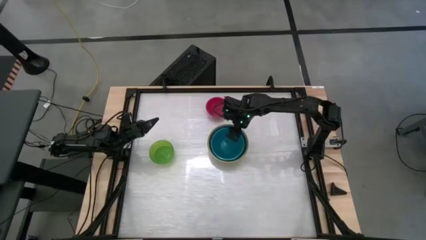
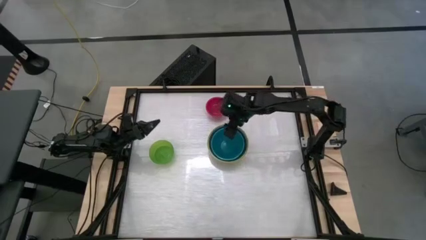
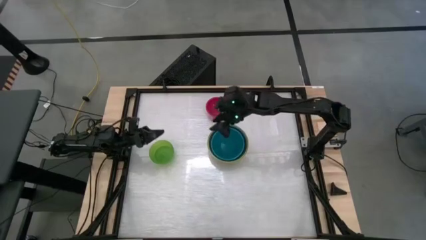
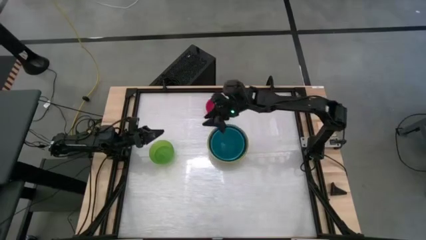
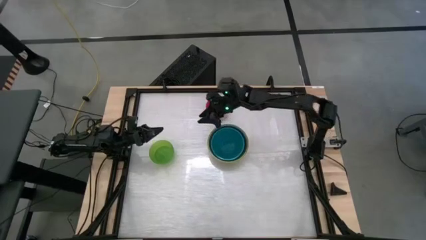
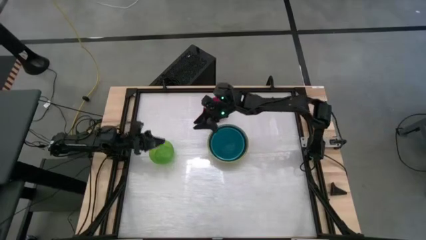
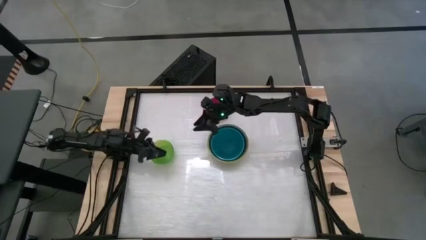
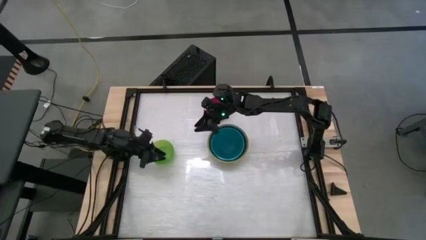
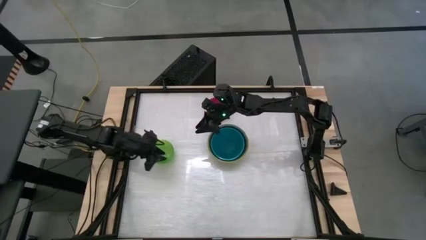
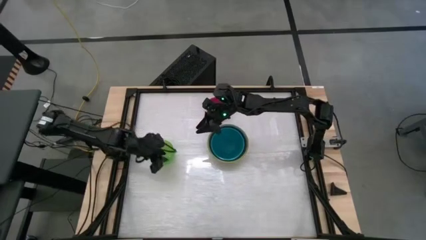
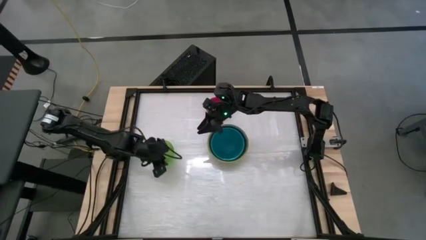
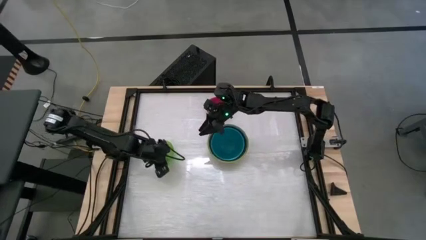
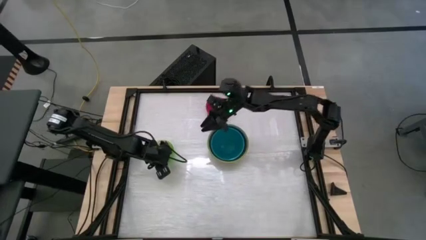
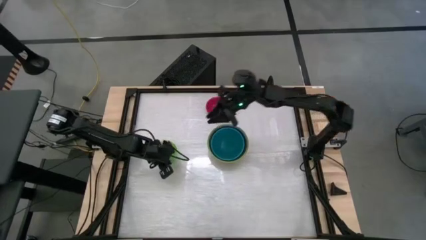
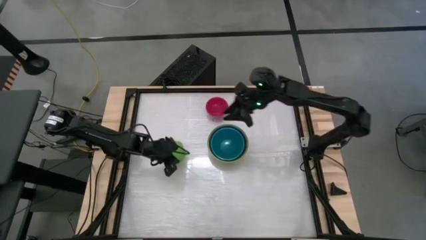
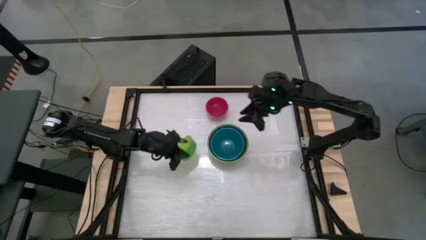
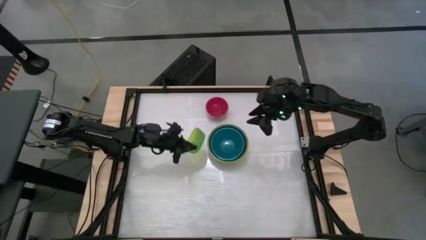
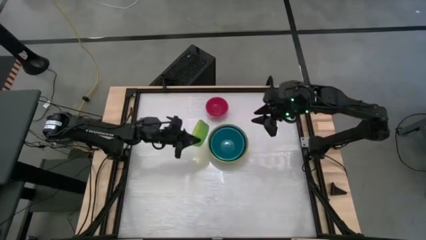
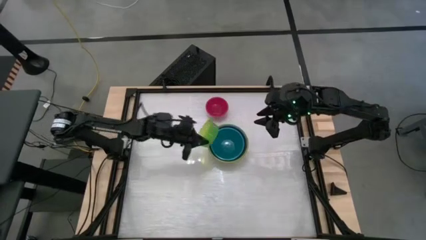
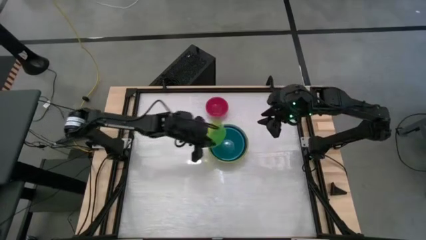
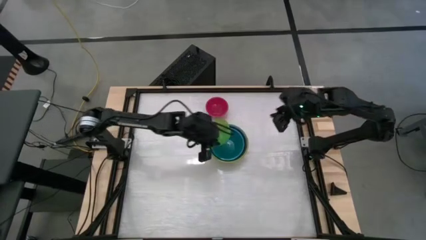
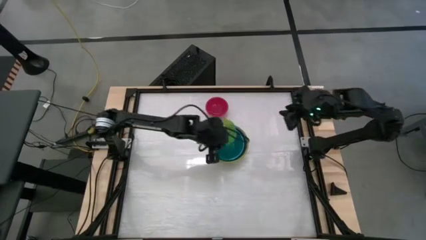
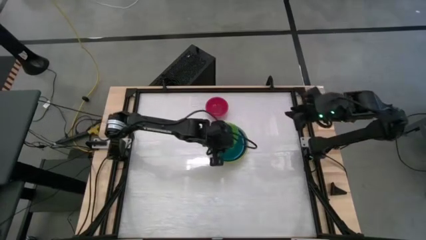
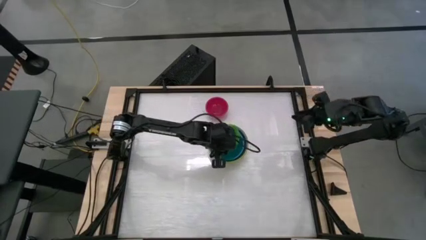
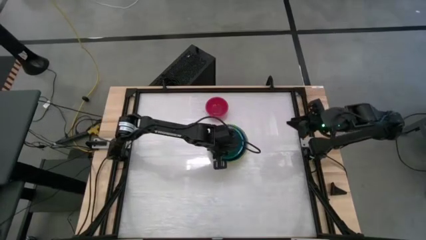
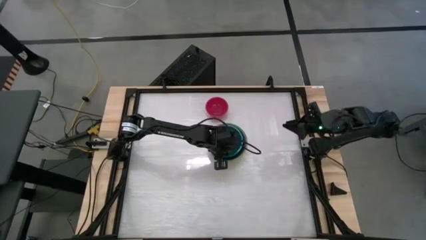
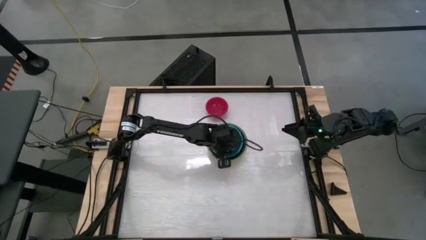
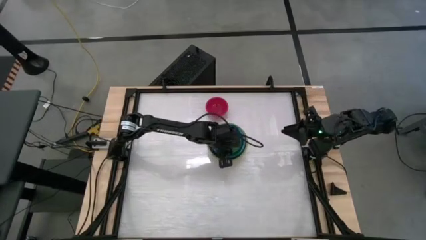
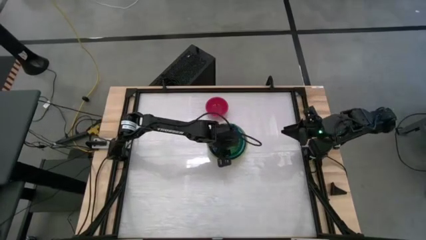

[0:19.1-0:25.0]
Stack the green bowl on the light blue bowl

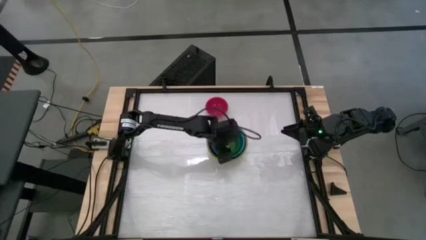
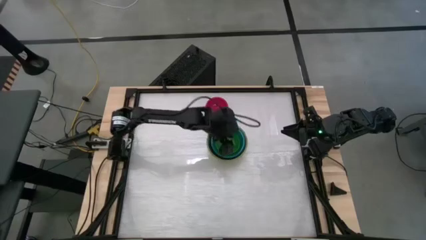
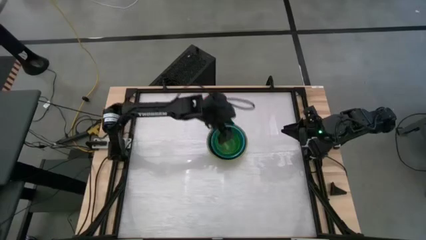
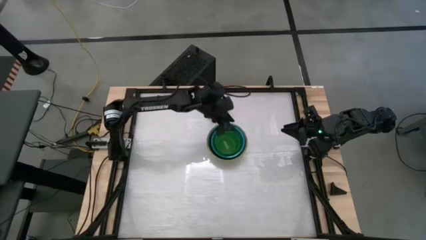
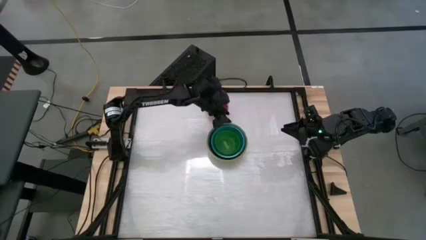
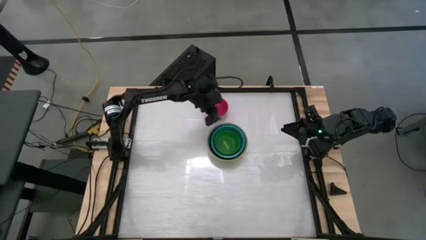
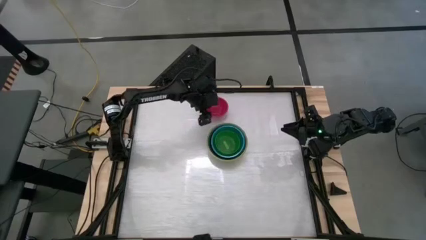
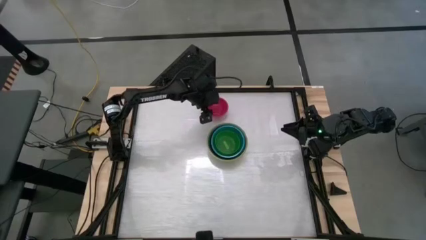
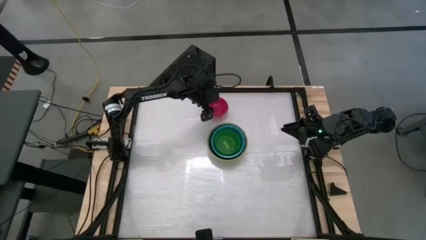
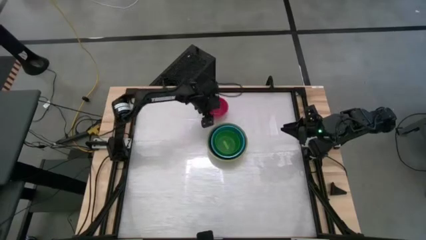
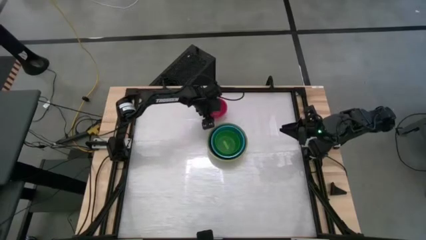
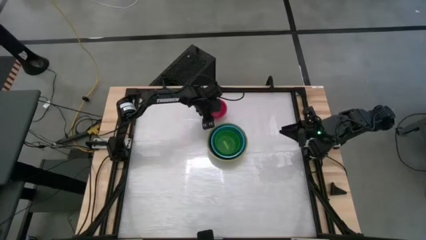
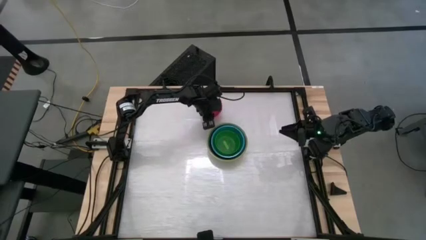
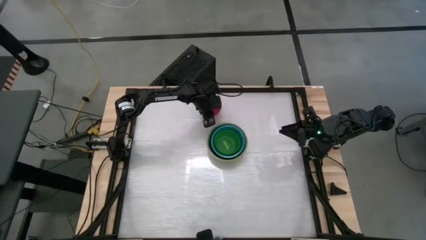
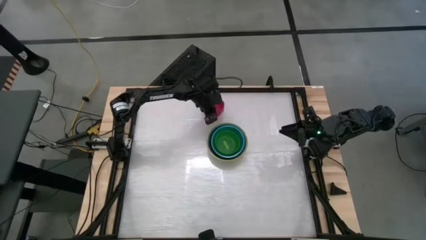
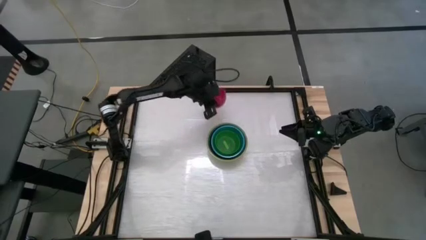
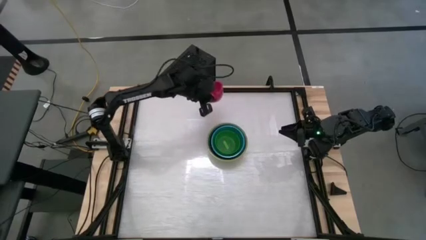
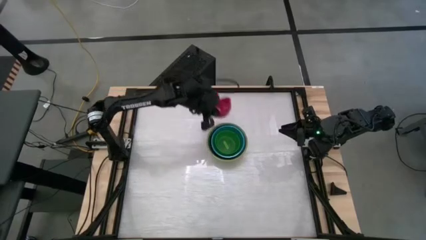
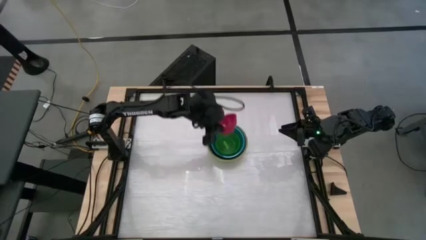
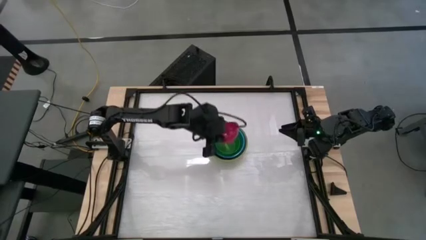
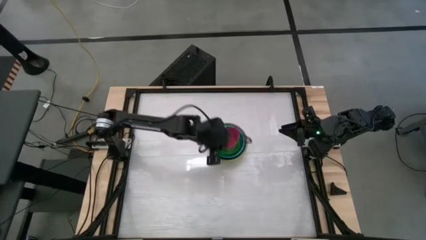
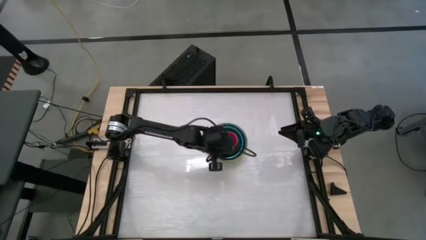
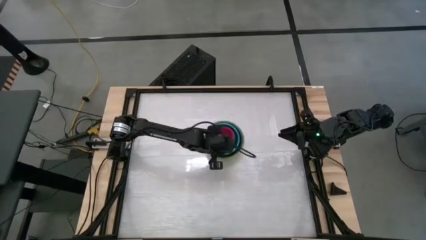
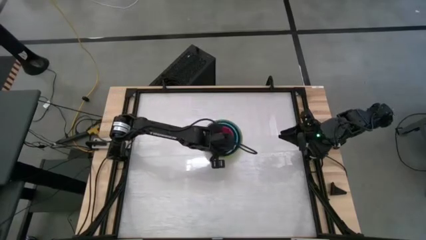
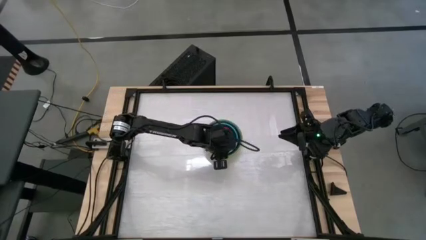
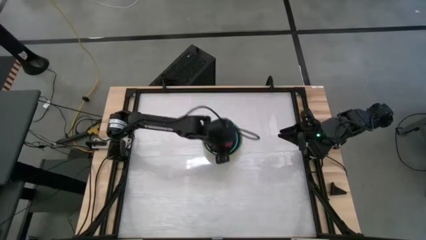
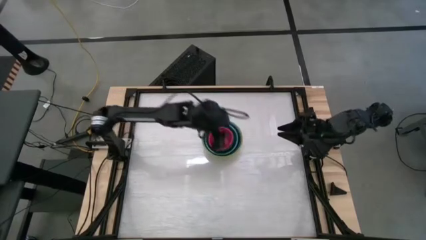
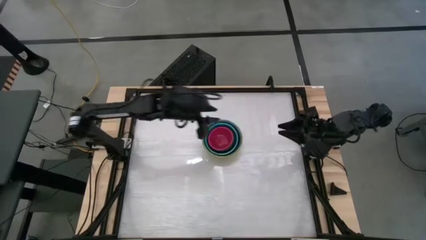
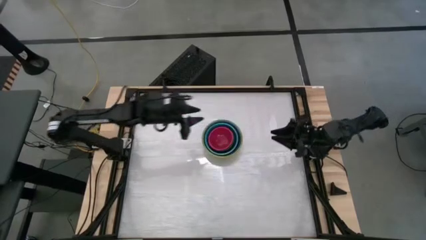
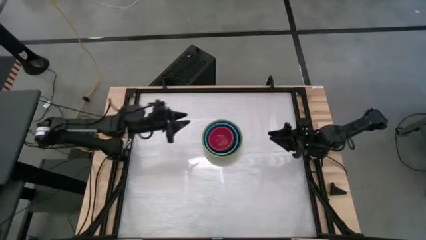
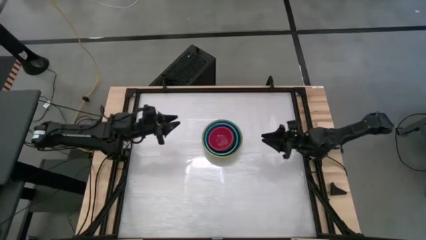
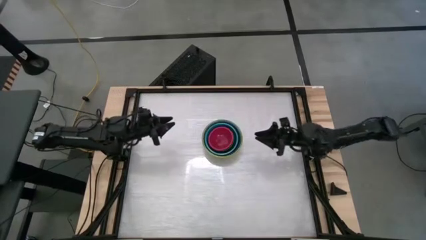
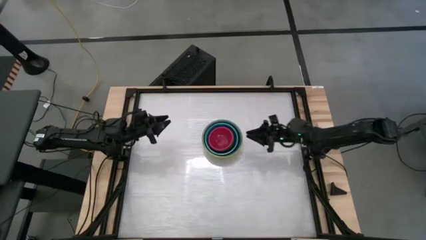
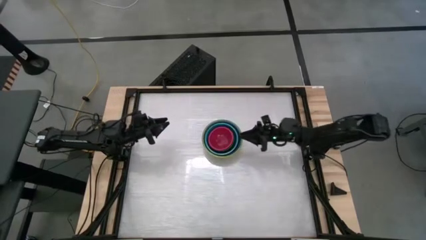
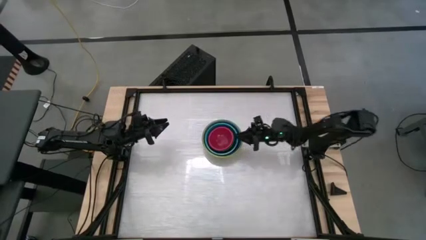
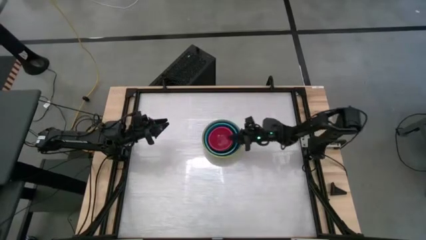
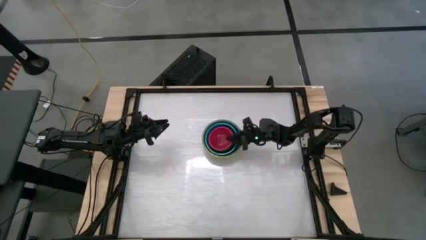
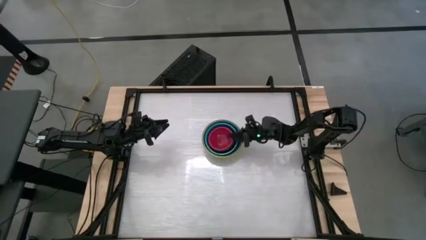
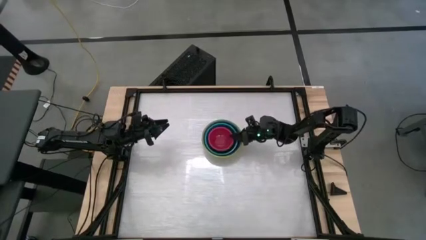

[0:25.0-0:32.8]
Stack the pink bowl on the green bowl
